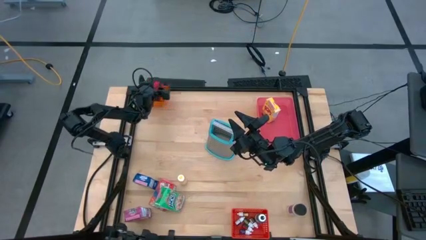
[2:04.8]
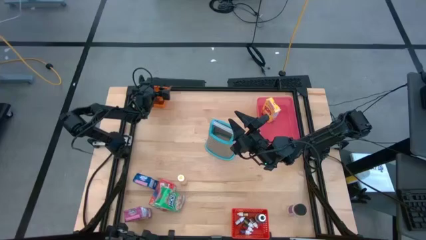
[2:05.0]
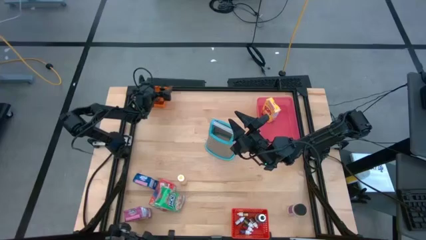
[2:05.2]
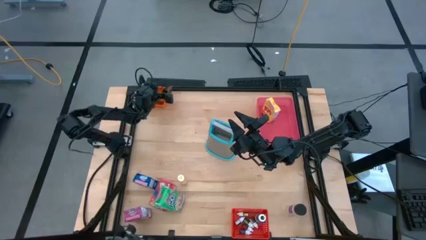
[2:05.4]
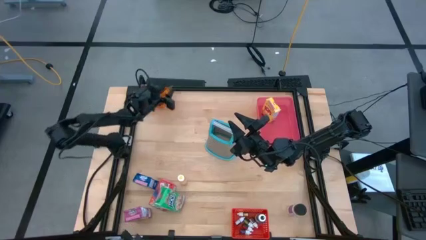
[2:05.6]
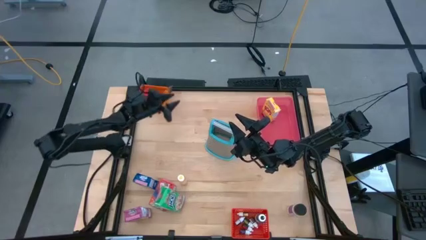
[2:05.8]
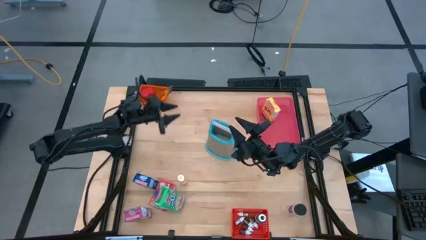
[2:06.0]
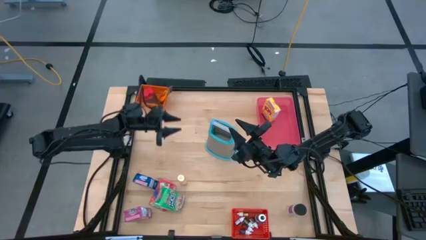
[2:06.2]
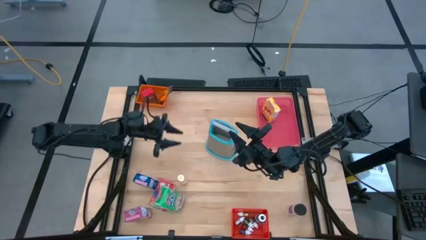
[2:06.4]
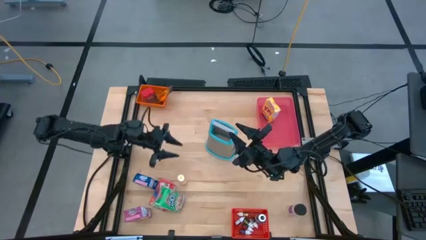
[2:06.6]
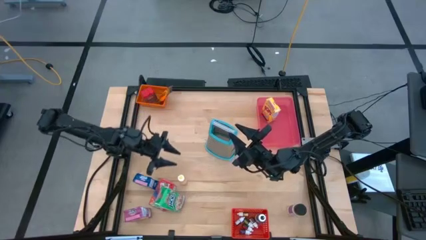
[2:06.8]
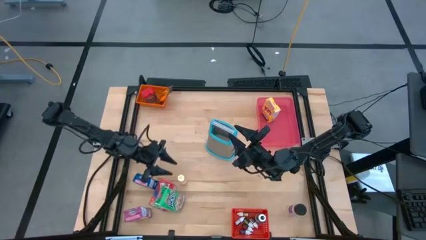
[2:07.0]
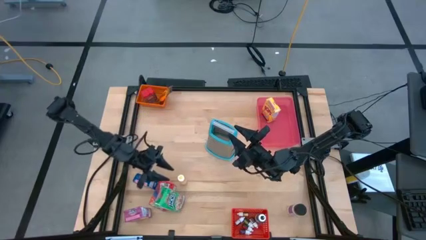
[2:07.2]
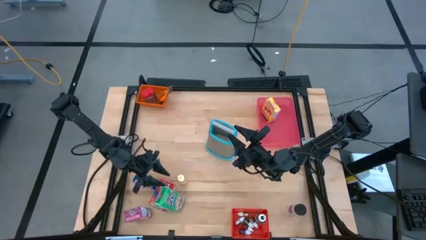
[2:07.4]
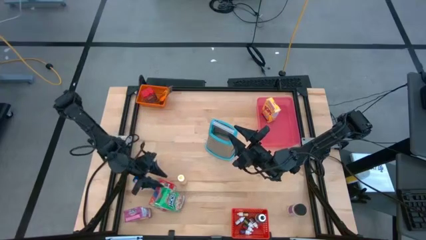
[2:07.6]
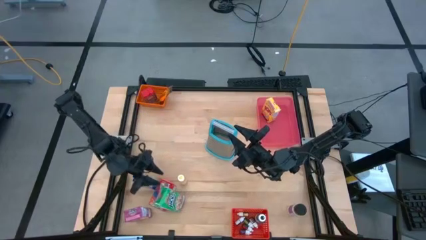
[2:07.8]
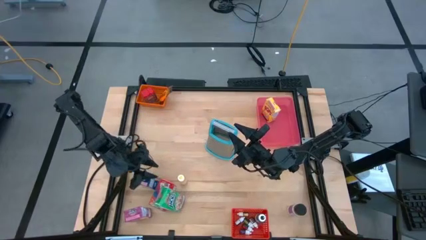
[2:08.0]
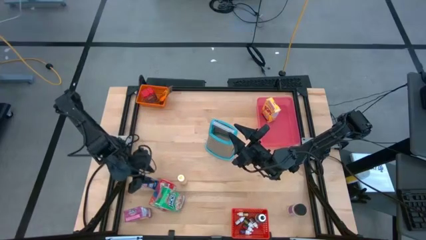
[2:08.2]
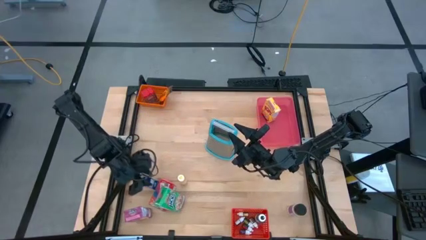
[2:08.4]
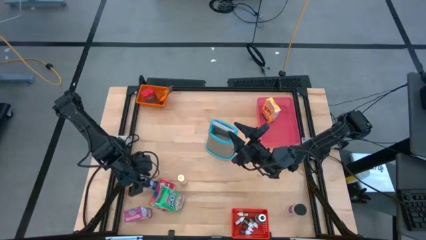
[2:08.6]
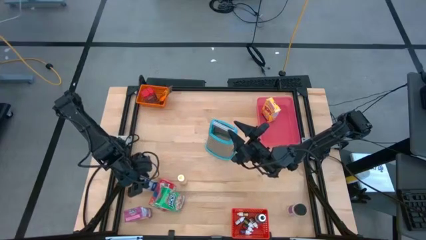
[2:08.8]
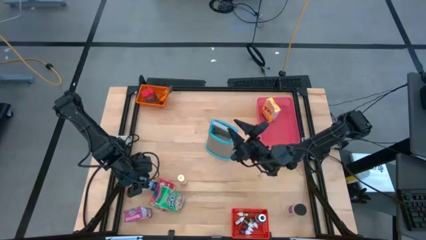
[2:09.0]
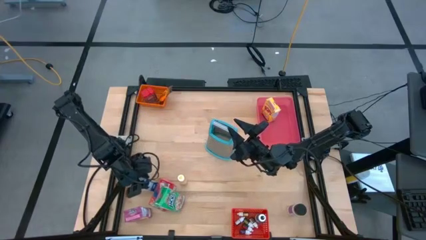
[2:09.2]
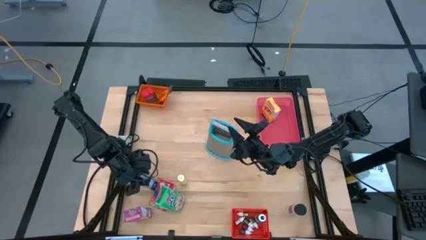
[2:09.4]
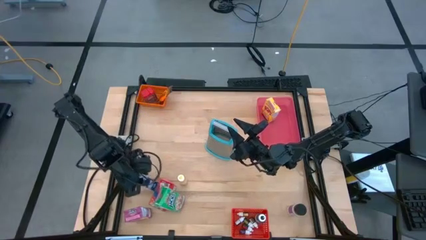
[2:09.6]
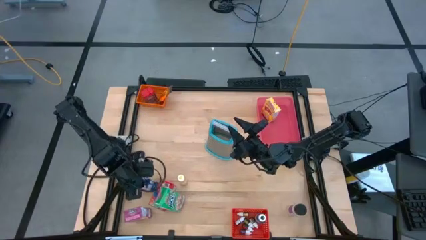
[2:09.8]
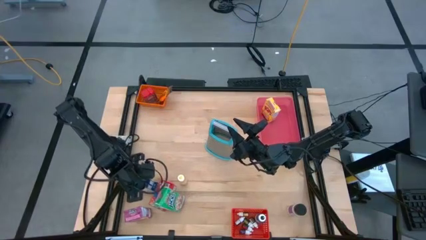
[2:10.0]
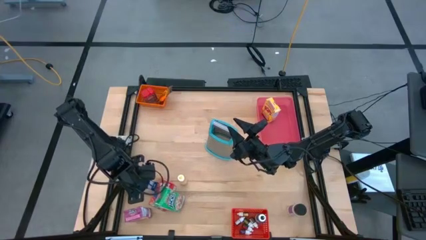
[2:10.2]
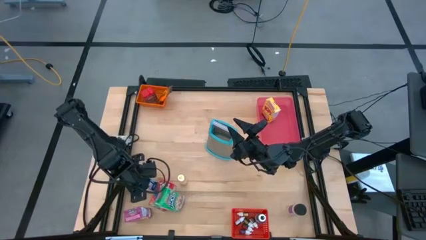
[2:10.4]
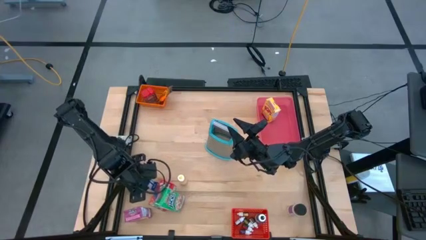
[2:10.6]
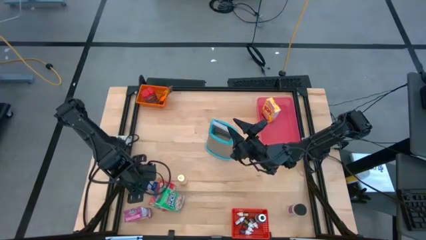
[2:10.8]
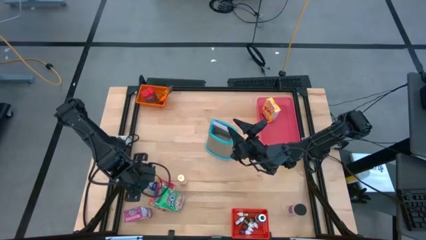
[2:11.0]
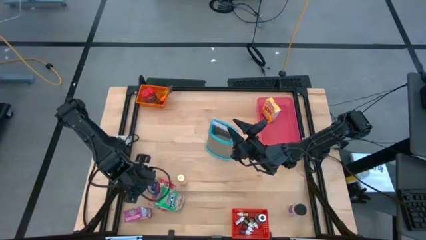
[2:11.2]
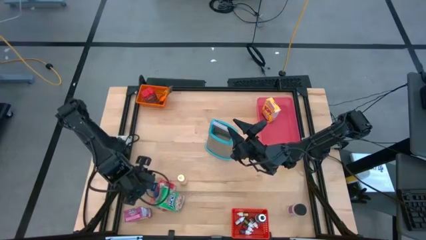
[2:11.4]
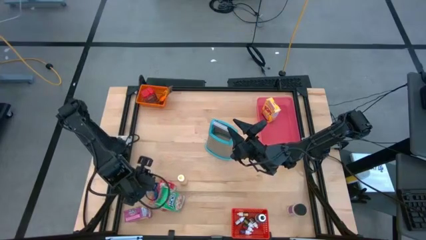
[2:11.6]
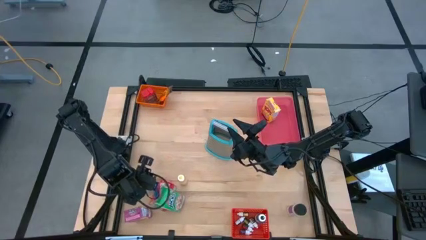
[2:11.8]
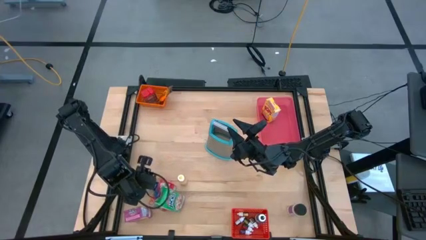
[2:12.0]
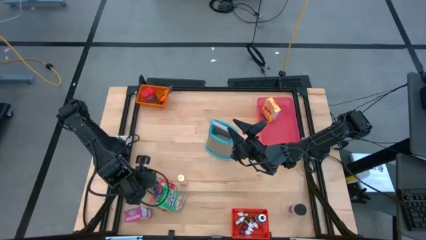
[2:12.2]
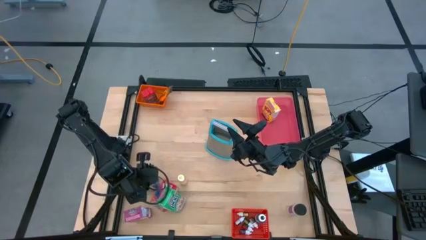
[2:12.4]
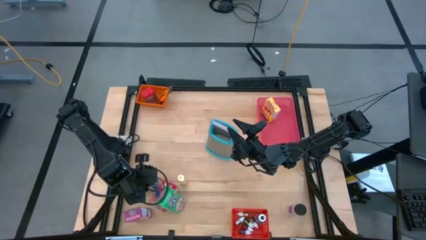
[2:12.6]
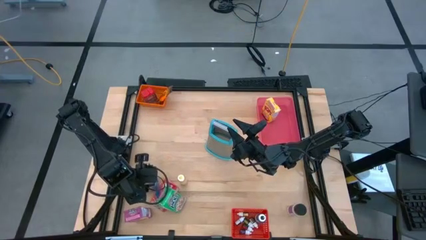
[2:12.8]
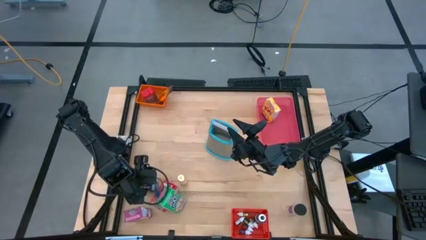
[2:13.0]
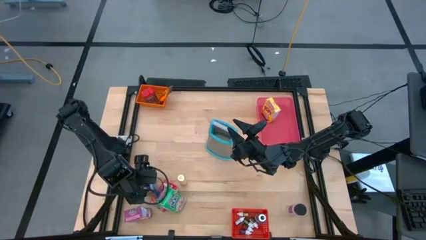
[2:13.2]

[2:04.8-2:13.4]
Task: Pick & Place Kitchen Items
Put the blue cereal box into the pink bin

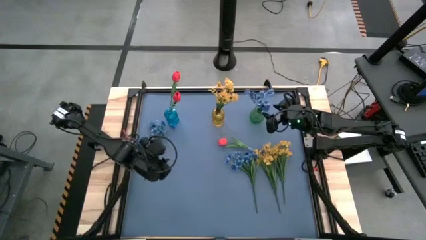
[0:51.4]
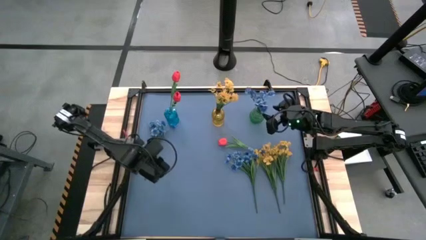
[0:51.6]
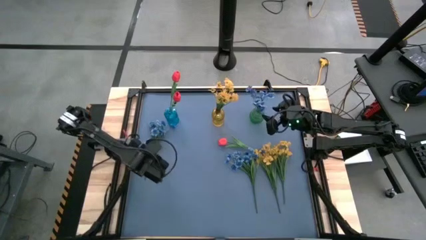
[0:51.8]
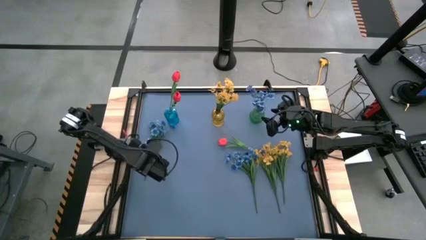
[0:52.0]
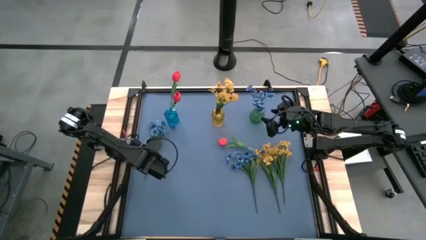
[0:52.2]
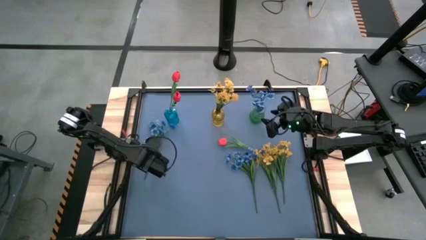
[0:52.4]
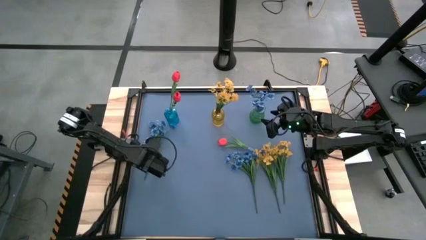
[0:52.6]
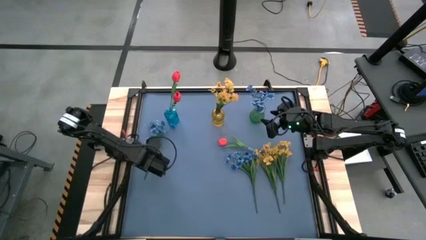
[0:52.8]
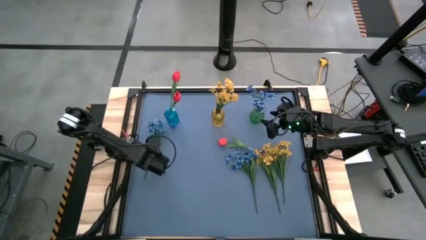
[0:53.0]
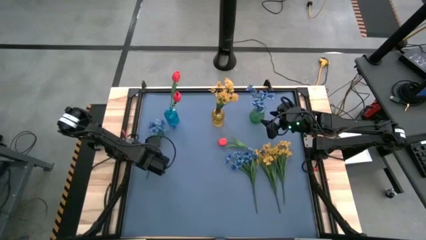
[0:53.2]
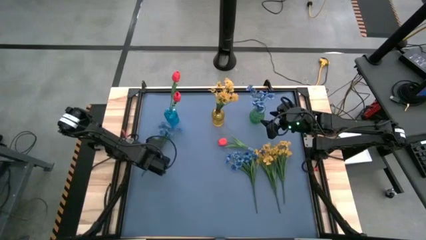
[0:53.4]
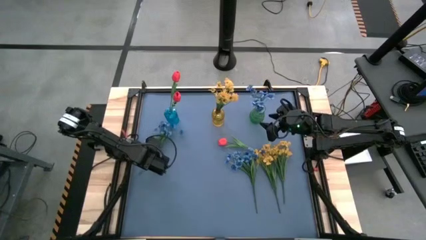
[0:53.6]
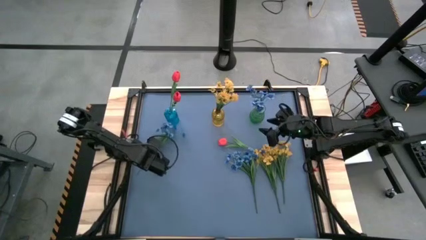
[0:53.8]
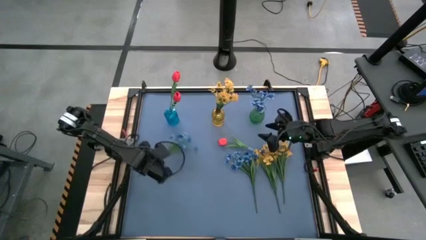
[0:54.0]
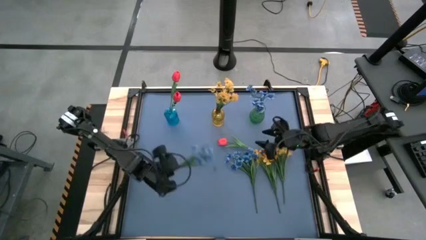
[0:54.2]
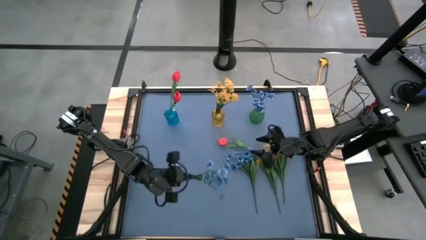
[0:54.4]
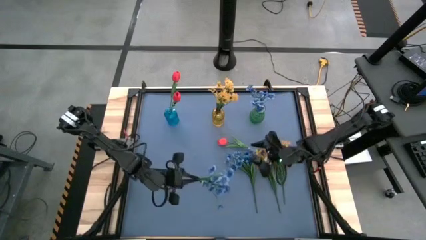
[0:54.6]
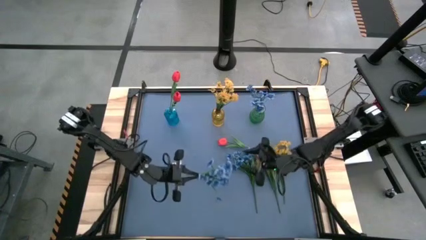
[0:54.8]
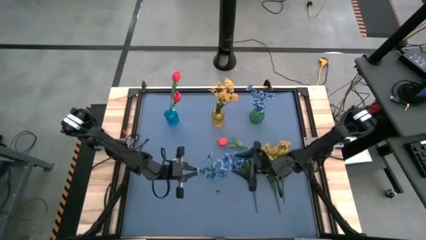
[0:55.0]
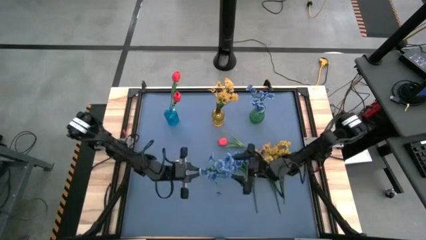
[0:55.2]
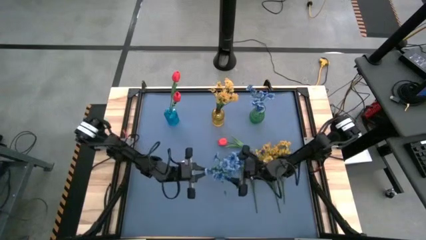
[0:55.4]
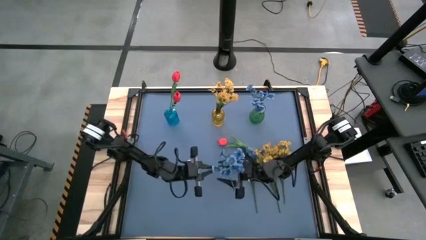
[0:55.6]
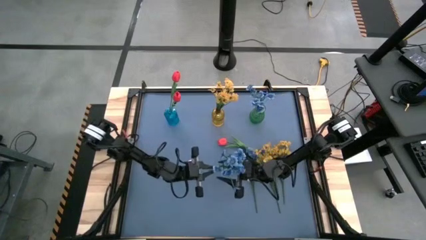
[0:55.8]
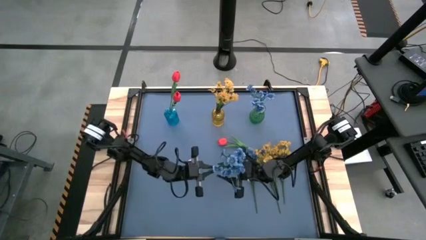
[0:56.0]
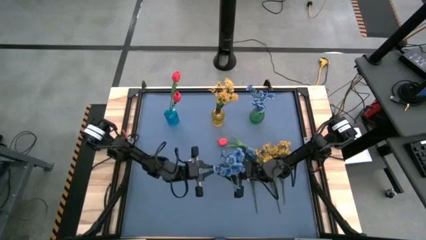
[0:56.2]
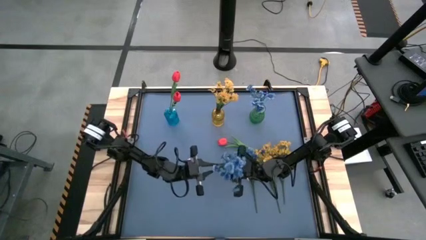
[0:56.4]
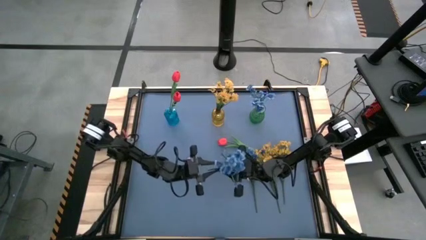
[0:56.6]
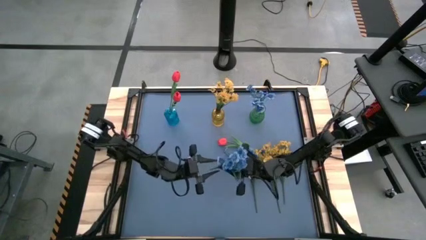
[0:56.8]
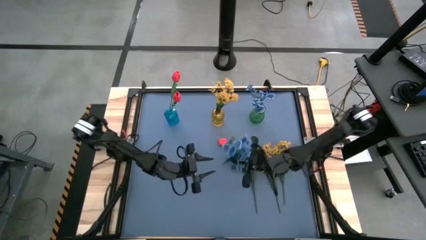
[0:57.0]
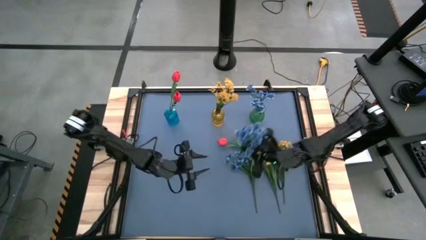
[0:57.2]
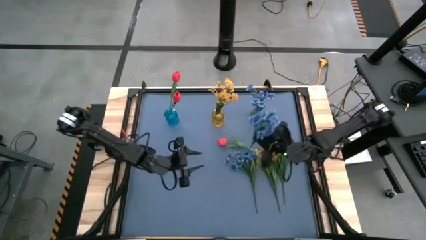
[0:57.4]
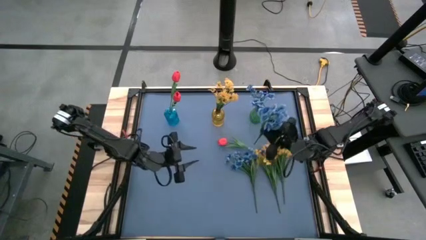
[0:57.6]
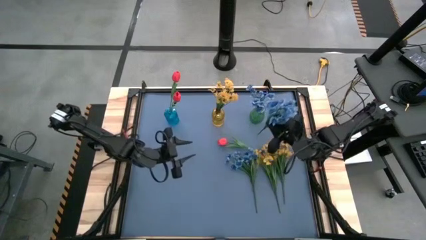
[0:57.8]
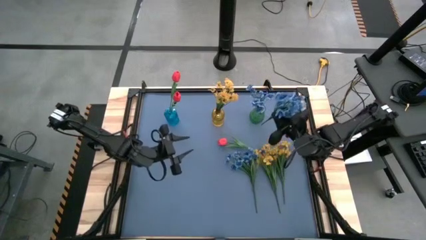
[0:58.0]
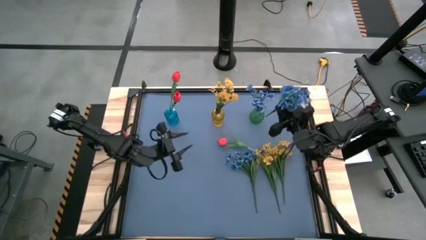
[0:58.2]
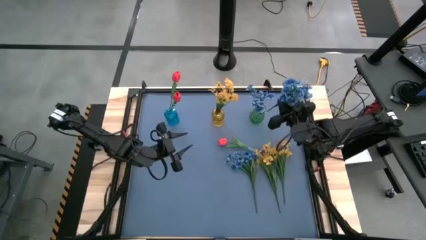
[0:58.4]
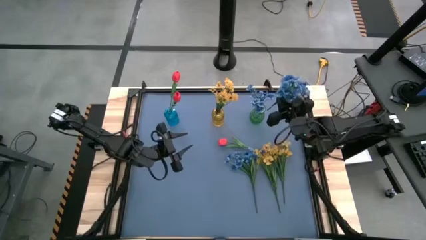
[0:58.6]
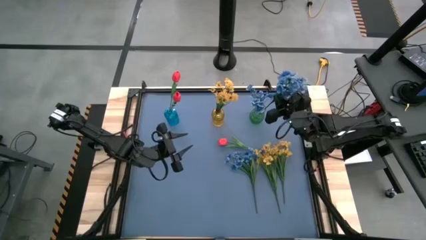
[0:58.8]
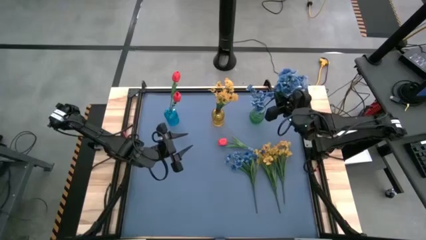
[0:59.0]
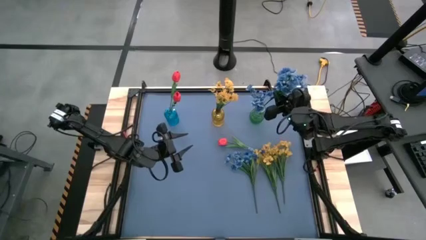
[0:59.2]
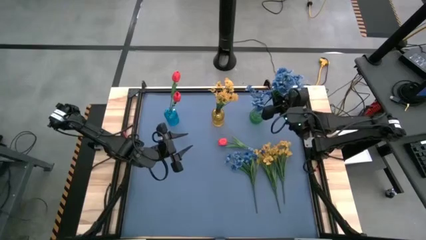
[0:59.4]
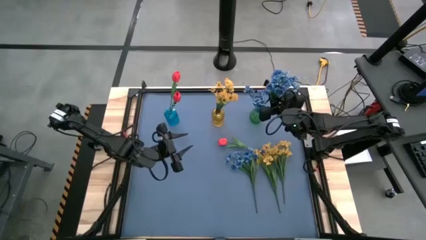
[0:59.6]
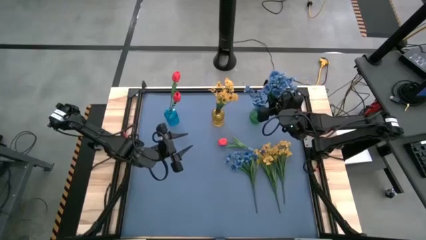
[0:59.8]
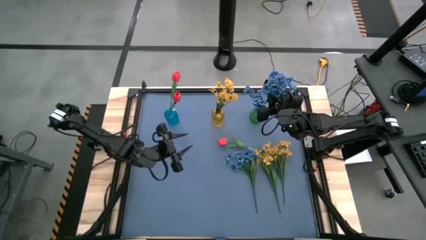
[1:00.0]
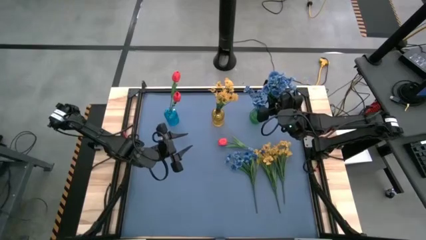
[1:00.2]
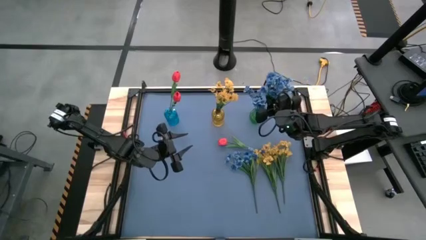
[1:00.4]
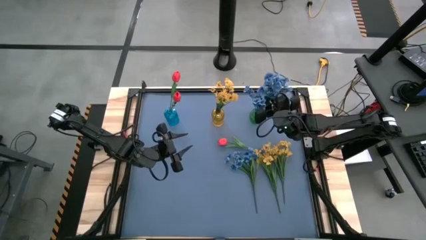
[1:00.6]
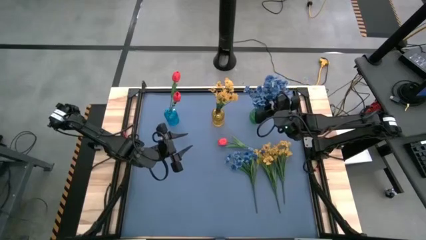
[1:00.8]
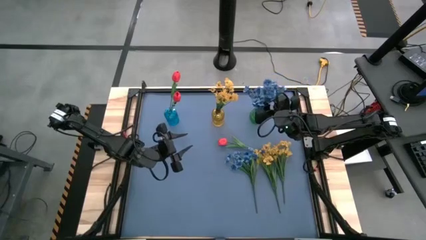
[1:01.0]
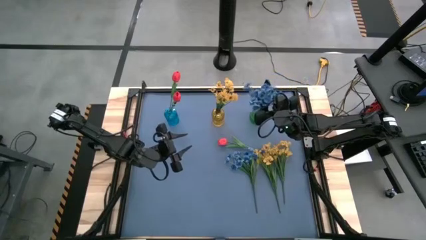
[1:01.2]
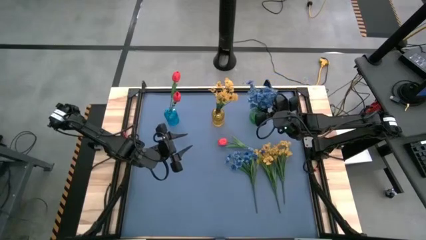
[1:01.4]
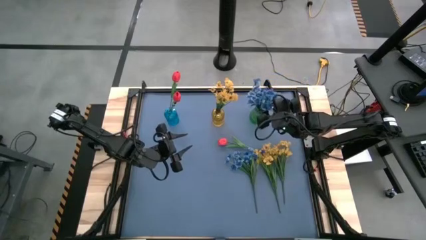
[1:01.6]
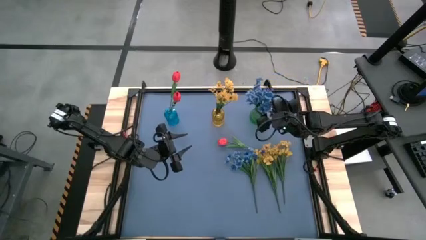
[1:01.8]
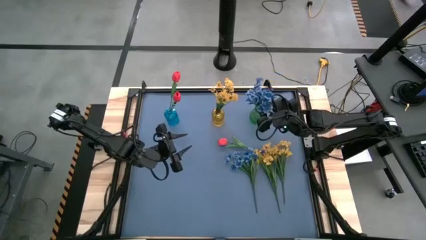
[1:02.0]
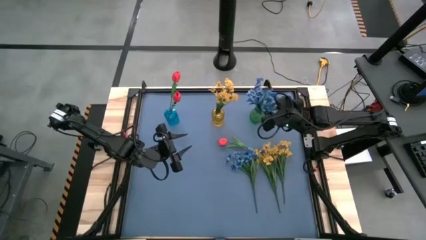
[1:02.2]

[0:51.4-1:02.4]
Task: Sort flowers into vase by color
Put the top blue flowers into the green vase
